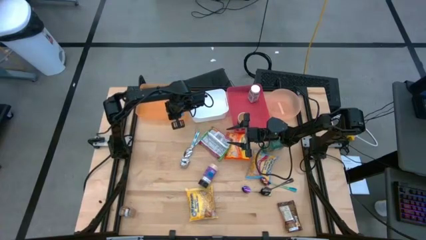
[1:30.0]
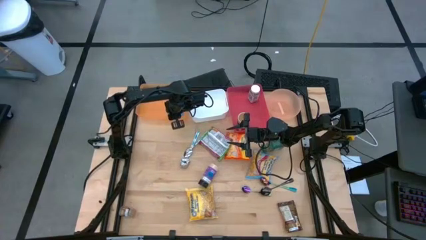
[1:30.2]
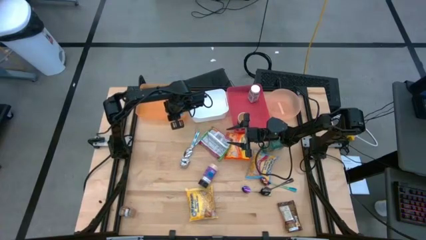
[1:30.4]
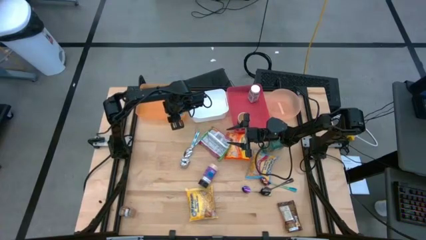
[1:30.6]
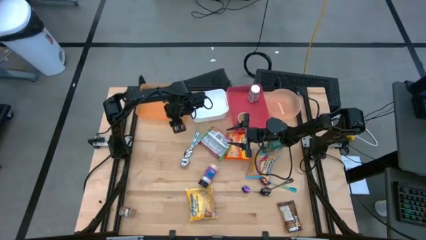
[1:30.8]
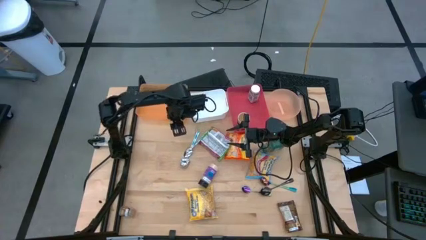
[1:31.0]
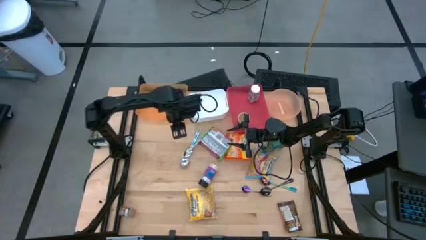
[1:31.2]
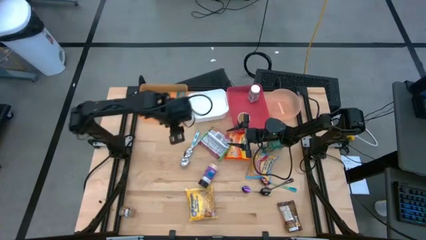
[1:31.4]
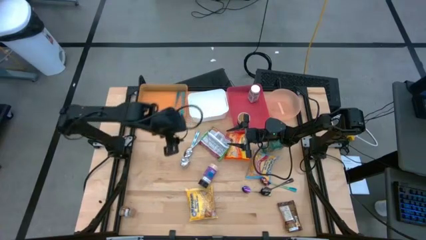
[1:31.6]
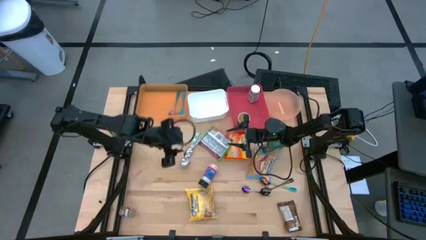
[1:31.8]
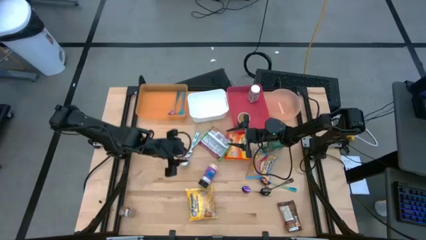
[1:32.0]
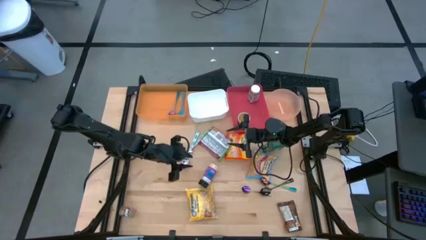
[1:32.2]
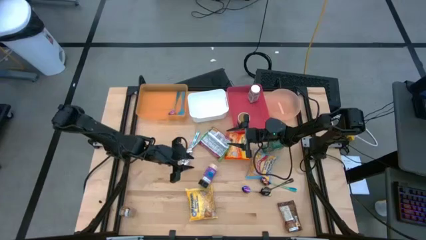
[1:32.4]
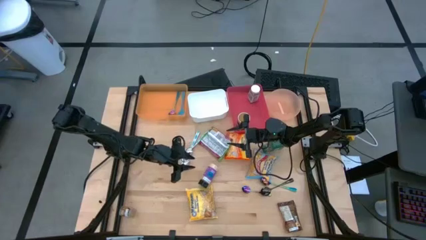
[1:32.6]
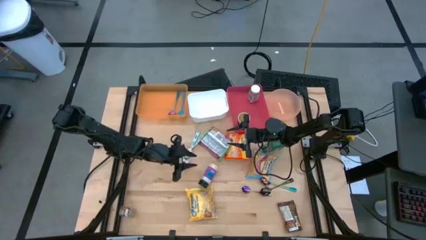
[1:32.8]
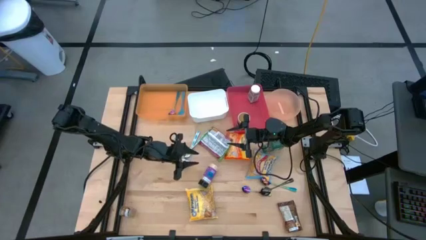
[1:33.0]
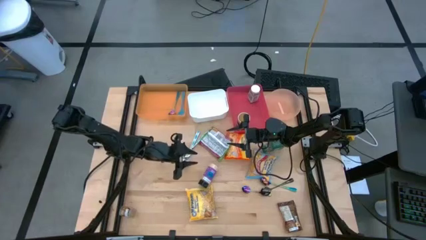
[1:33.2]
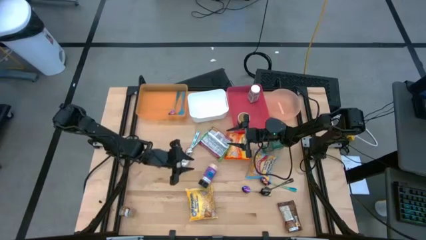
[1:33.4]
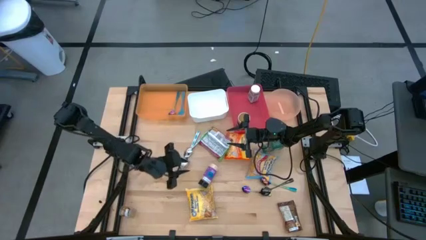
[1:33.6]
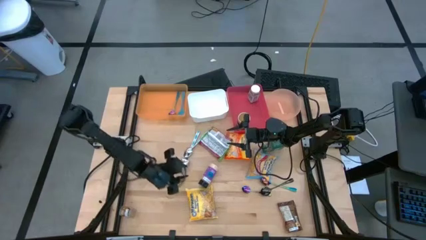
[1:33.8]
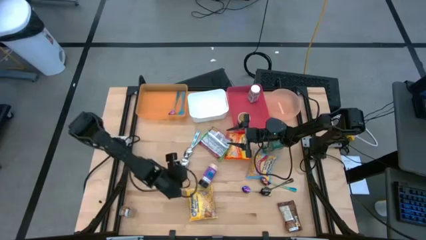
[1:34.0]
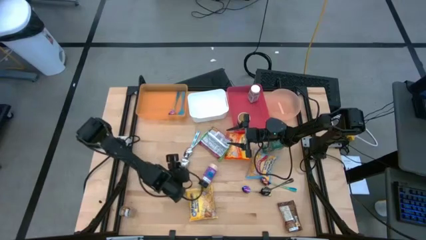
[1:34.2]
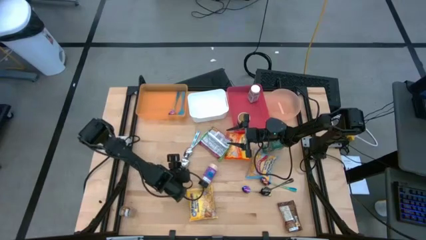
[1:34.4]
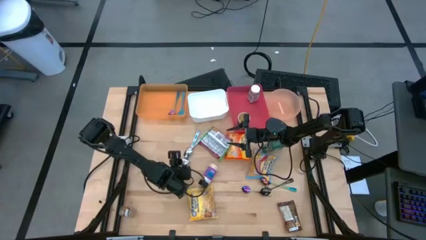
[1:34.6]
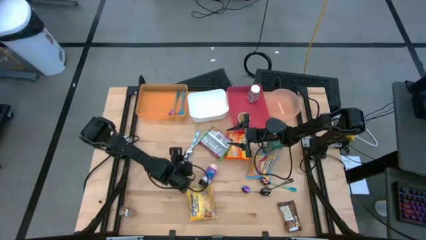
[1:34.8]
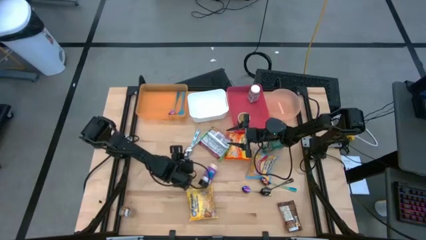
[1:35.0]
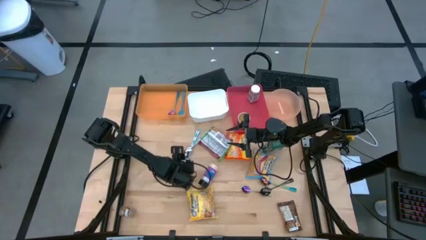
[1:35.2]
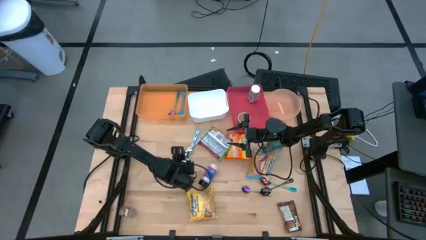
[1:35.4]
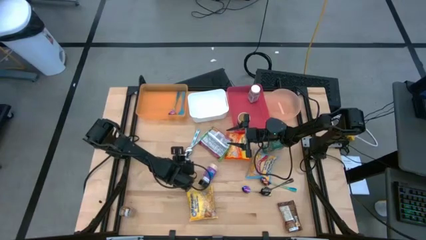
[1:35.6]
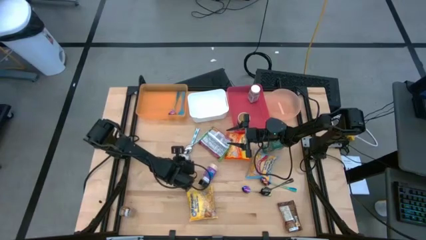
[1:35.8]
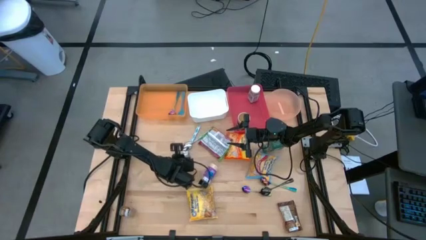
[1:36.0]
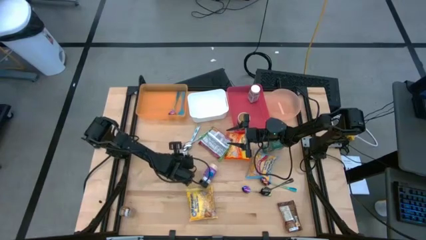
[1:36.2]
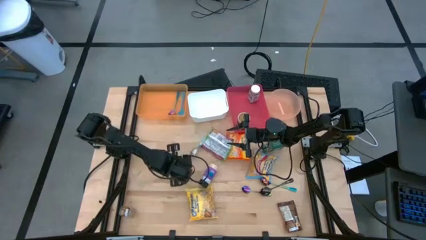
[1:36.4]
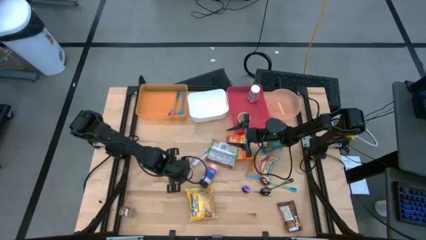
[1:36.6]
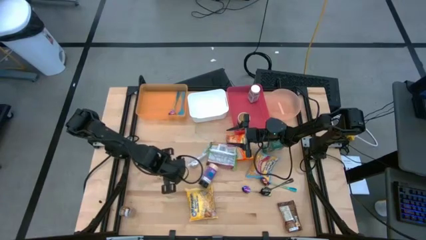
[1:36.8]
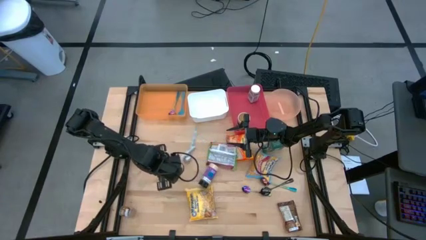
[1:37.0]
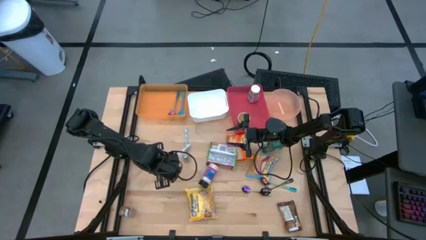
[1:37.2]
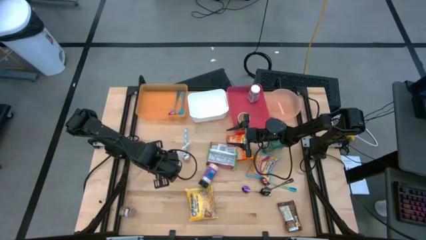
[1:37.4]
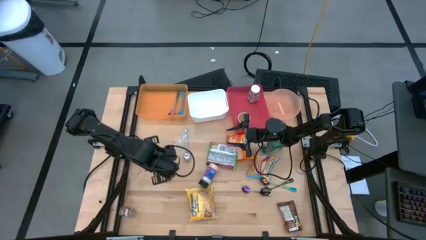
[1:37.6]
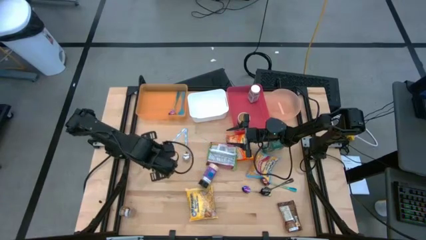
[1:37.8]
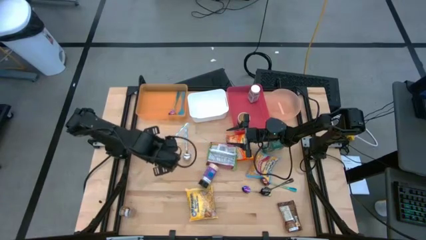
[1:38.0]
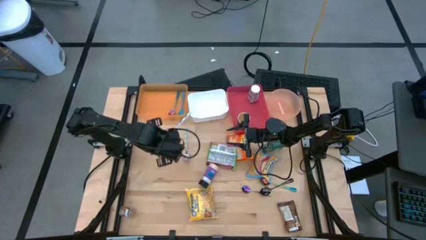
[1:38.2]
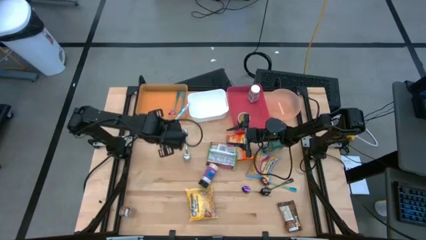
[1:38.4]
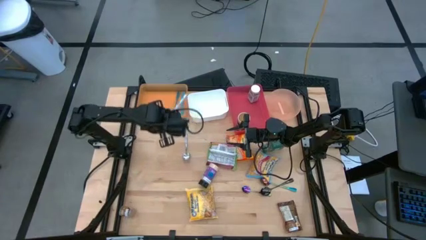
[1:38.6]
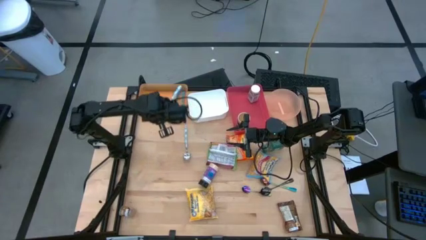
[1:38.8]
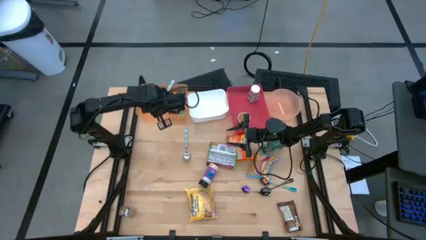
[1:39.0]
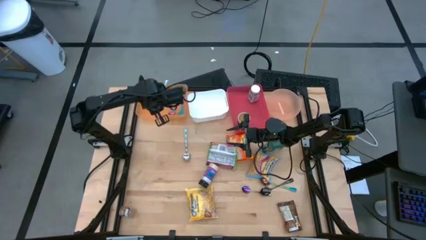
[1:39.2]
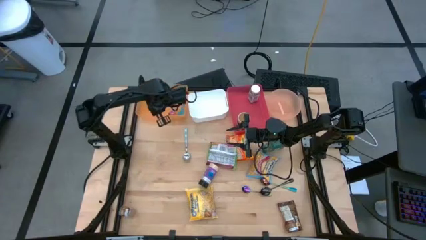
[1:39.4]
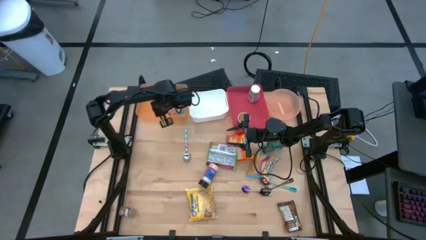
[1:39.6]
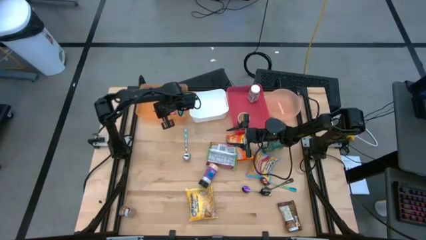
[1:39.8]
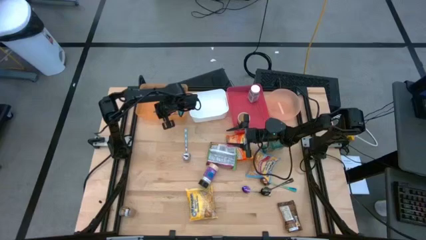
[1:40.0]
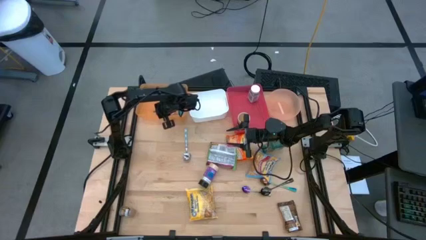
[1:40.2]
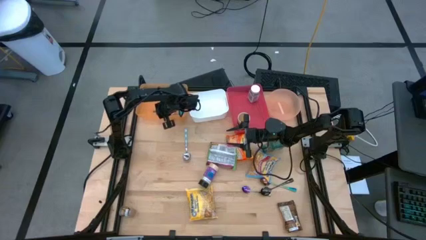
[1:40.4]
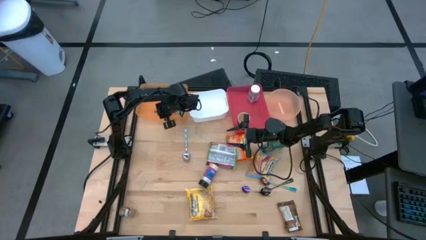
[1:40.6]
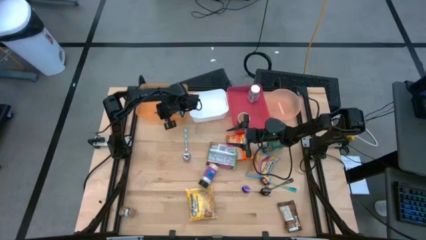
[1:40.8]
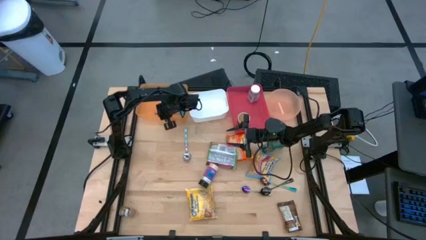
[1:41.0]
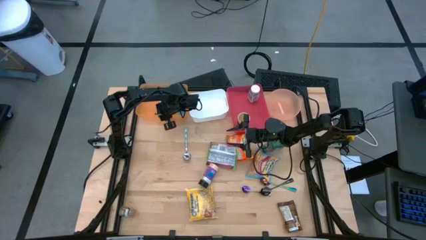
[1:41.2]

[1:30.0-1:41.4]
Task: Pick & Place Food Item
Put the left blue patterned spoon into the orange bin
